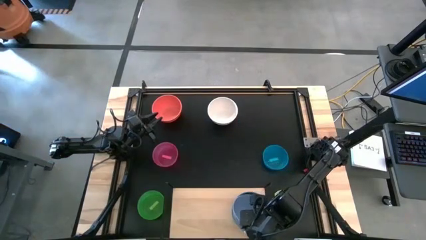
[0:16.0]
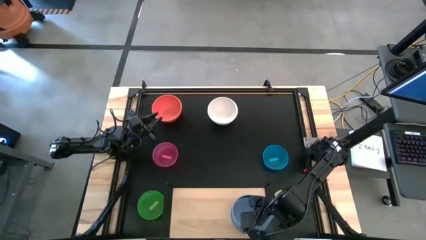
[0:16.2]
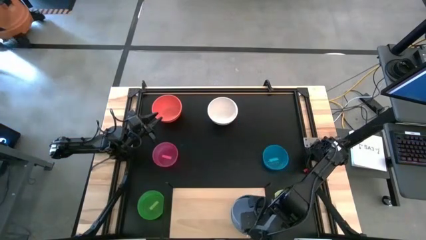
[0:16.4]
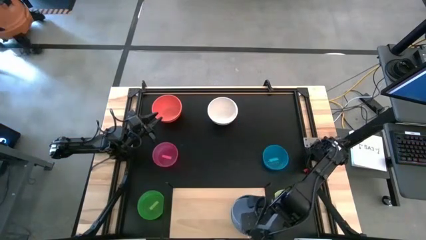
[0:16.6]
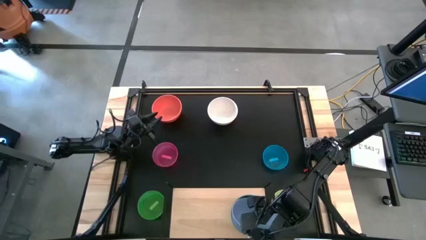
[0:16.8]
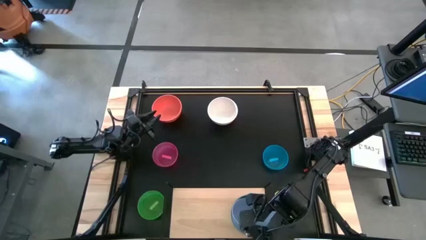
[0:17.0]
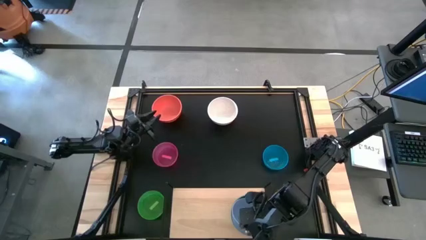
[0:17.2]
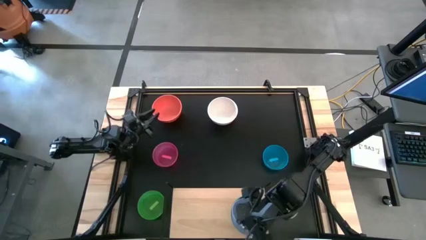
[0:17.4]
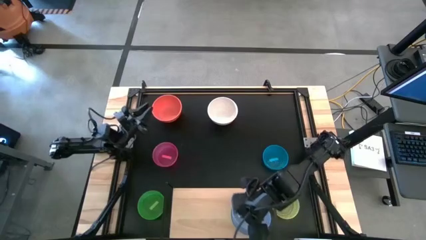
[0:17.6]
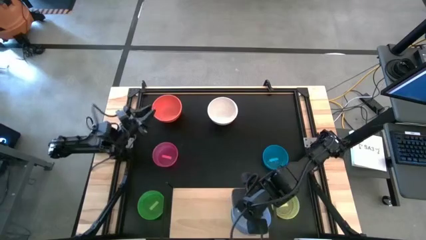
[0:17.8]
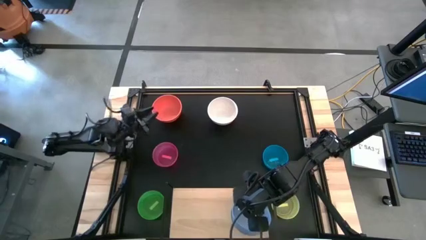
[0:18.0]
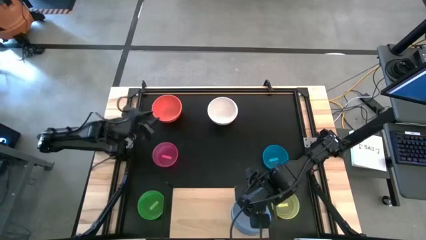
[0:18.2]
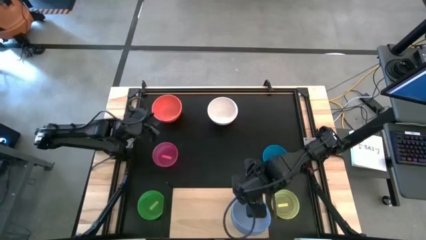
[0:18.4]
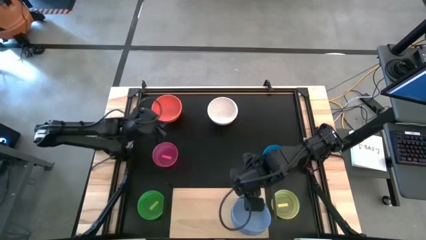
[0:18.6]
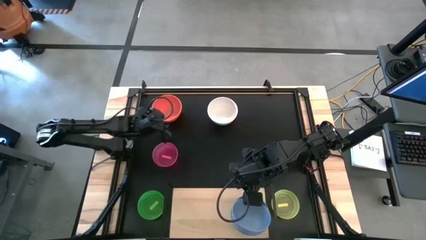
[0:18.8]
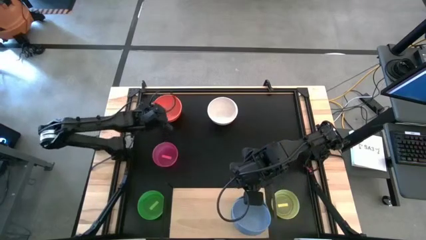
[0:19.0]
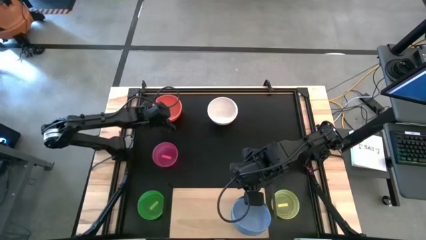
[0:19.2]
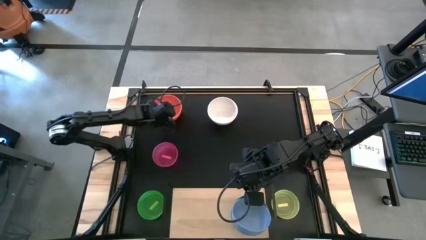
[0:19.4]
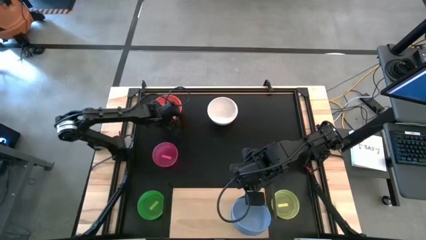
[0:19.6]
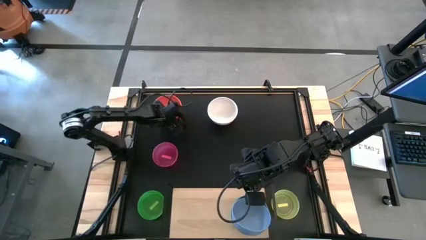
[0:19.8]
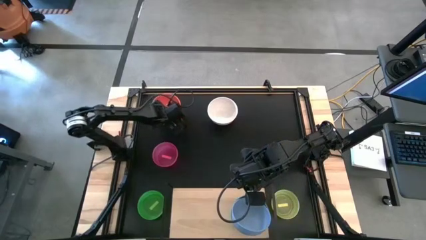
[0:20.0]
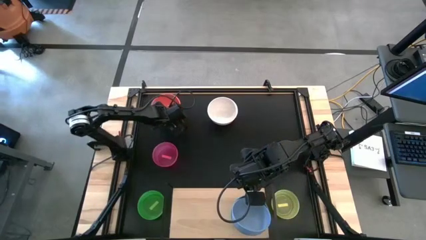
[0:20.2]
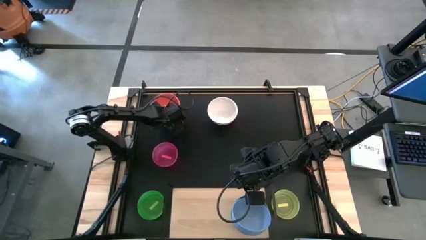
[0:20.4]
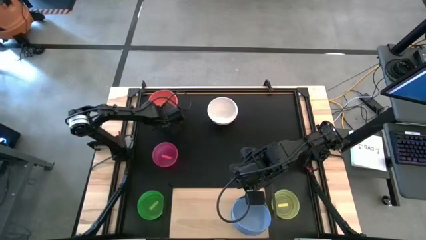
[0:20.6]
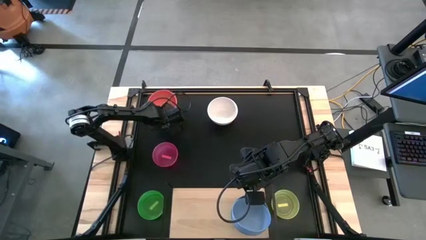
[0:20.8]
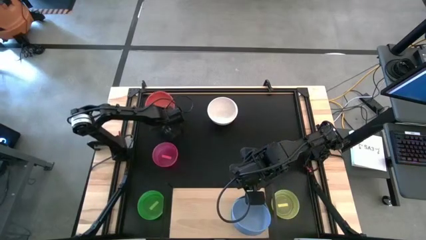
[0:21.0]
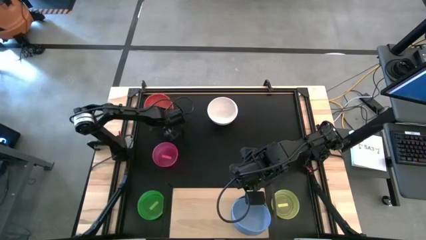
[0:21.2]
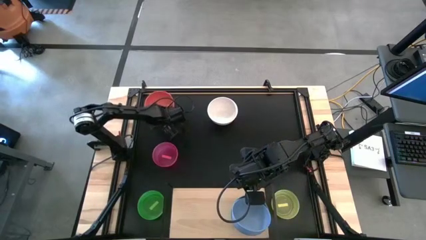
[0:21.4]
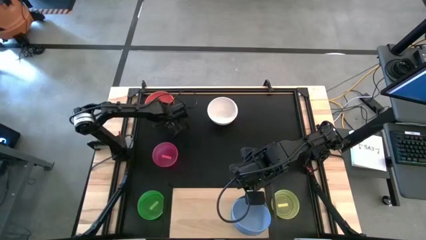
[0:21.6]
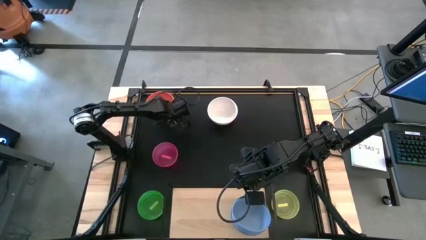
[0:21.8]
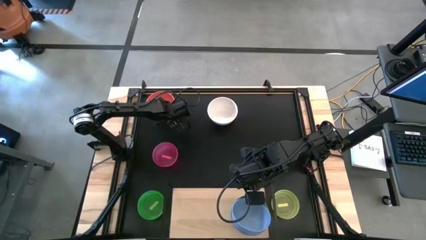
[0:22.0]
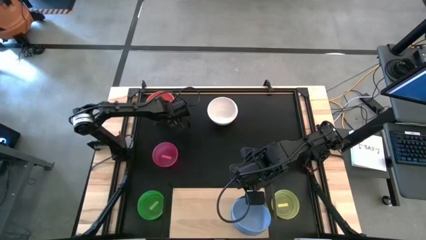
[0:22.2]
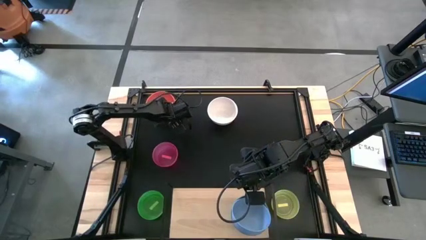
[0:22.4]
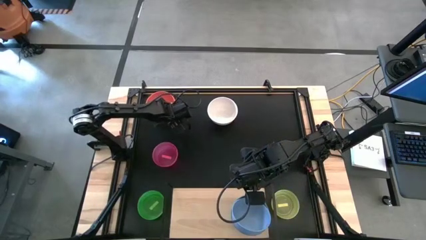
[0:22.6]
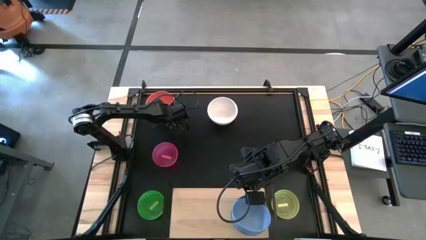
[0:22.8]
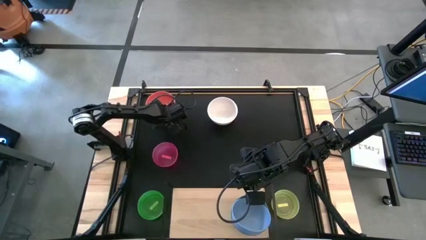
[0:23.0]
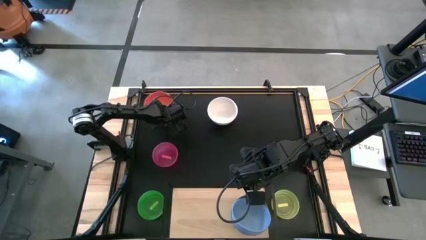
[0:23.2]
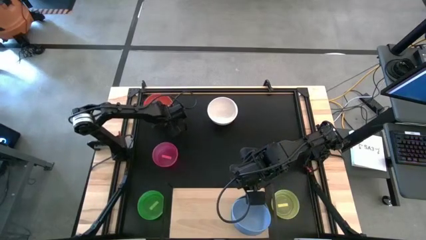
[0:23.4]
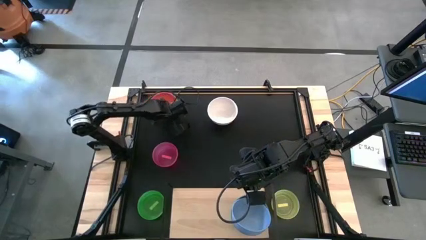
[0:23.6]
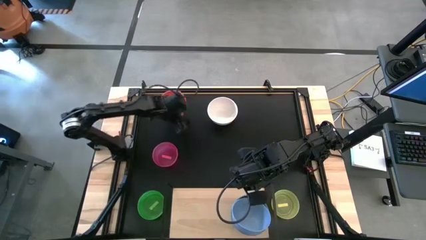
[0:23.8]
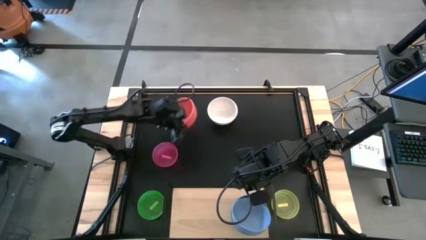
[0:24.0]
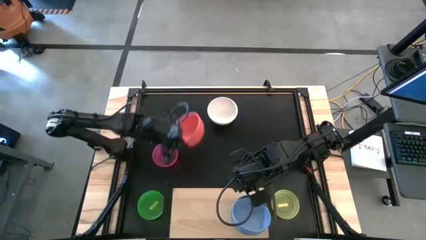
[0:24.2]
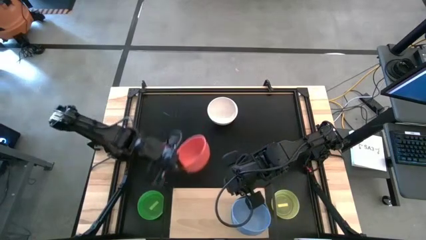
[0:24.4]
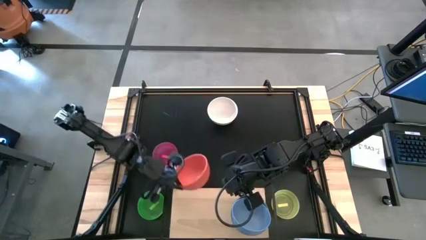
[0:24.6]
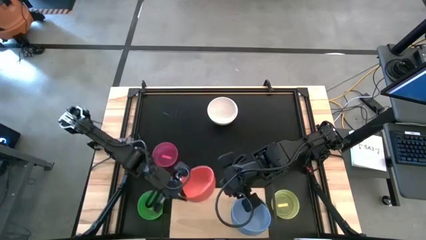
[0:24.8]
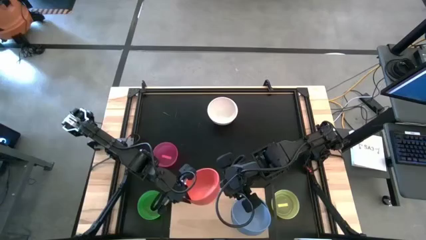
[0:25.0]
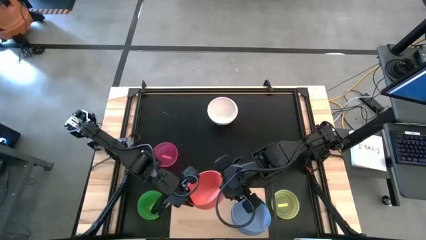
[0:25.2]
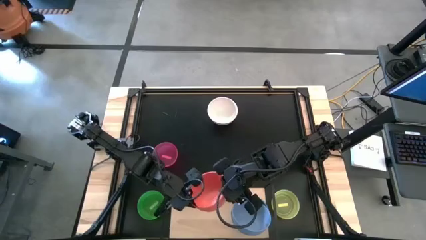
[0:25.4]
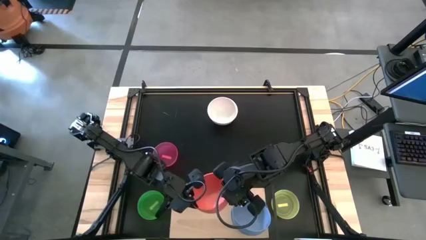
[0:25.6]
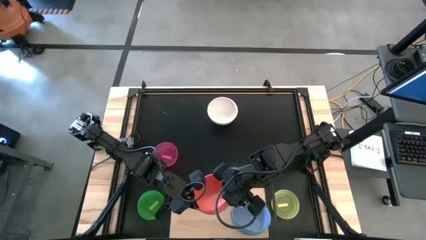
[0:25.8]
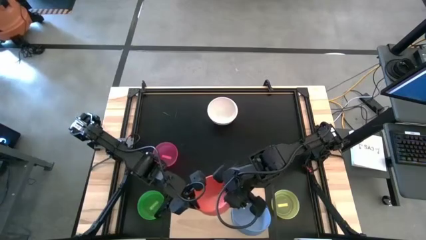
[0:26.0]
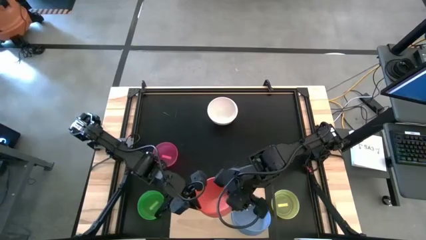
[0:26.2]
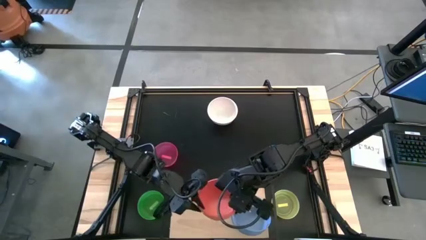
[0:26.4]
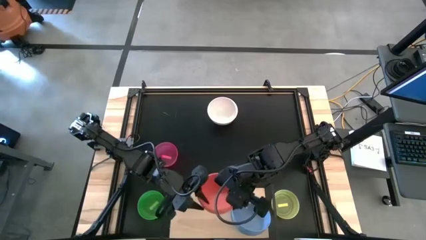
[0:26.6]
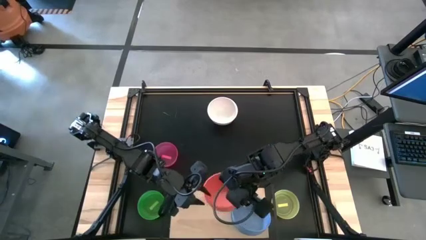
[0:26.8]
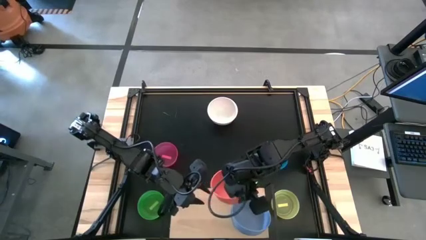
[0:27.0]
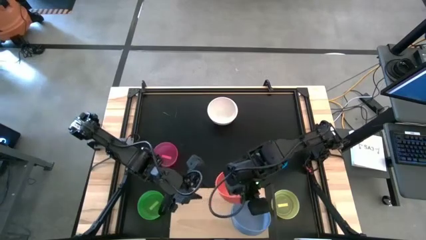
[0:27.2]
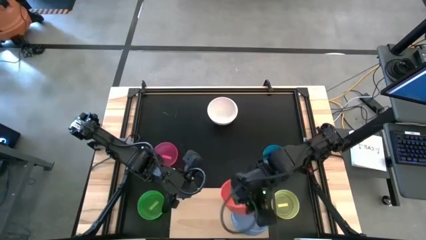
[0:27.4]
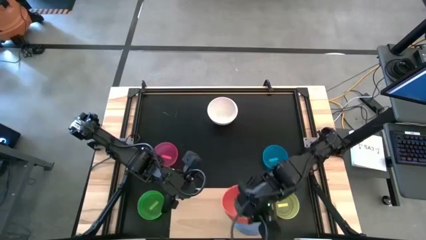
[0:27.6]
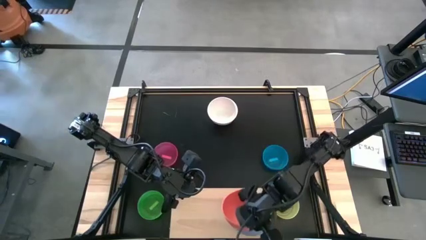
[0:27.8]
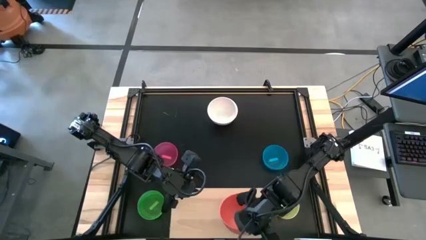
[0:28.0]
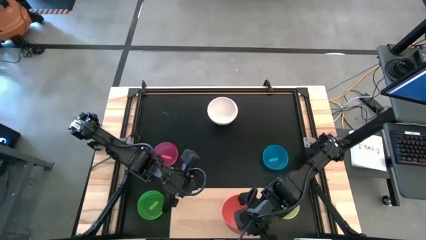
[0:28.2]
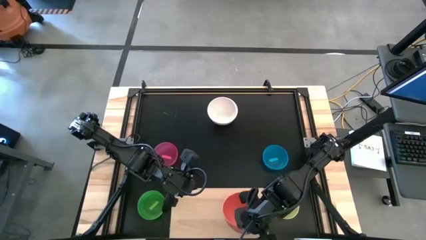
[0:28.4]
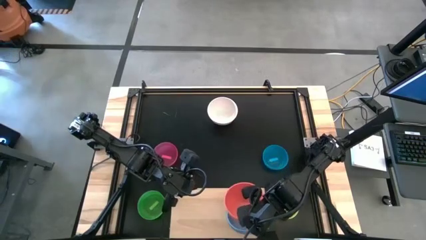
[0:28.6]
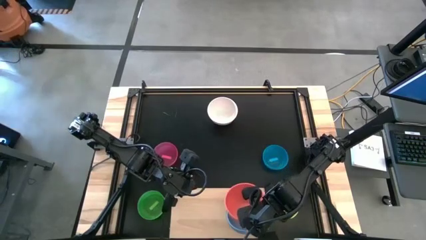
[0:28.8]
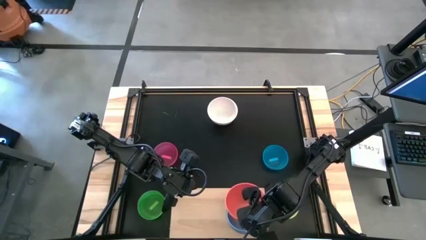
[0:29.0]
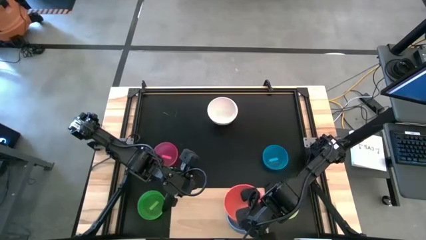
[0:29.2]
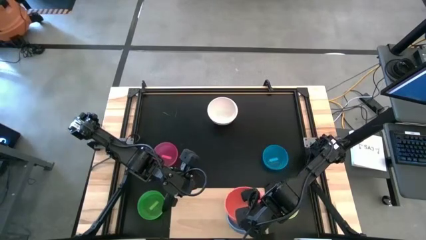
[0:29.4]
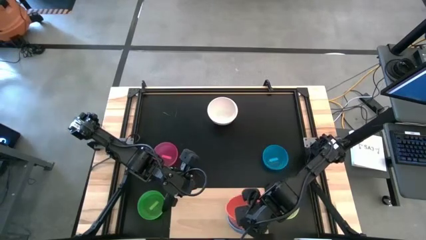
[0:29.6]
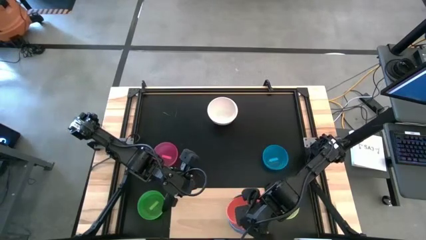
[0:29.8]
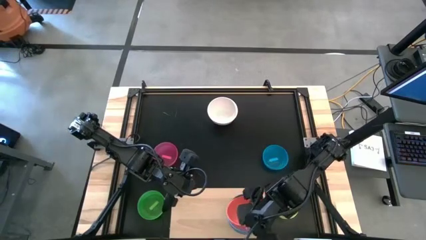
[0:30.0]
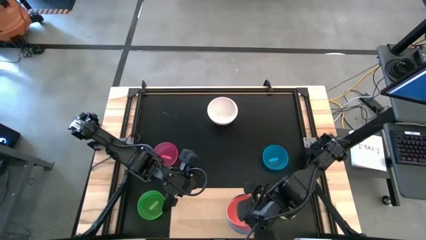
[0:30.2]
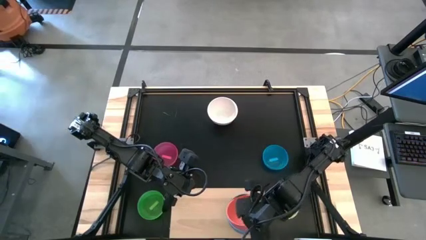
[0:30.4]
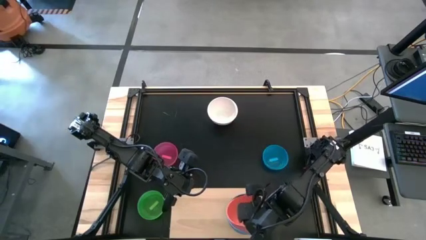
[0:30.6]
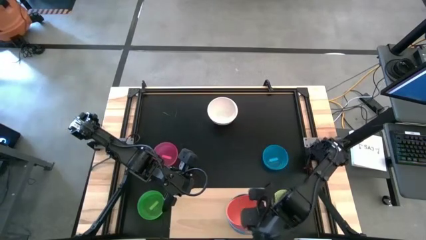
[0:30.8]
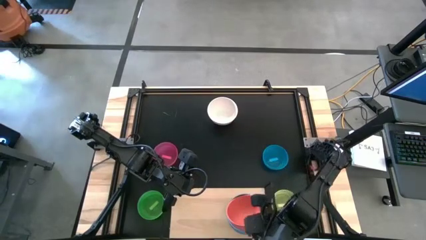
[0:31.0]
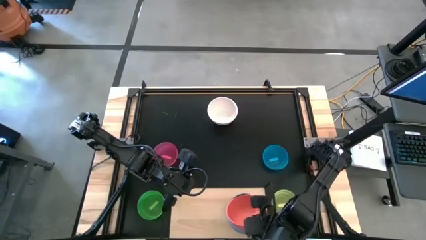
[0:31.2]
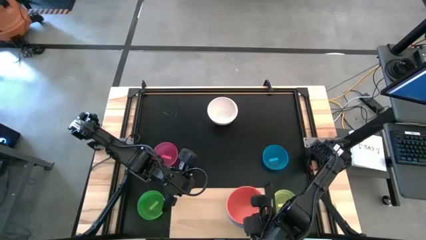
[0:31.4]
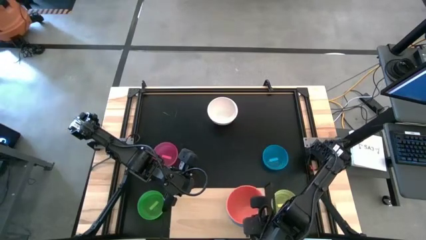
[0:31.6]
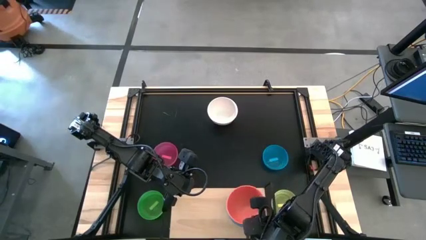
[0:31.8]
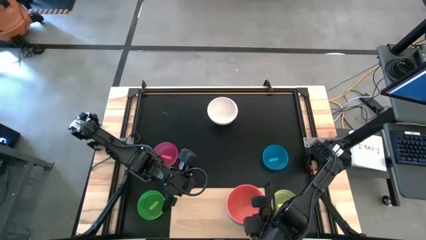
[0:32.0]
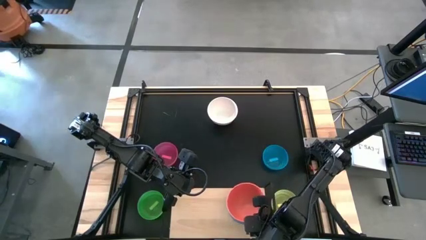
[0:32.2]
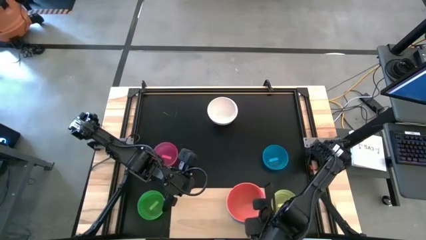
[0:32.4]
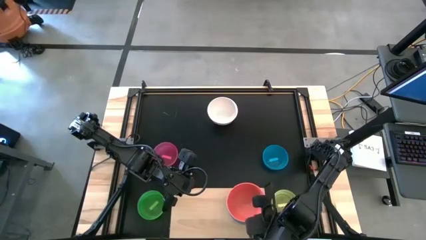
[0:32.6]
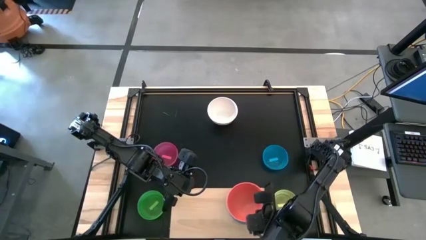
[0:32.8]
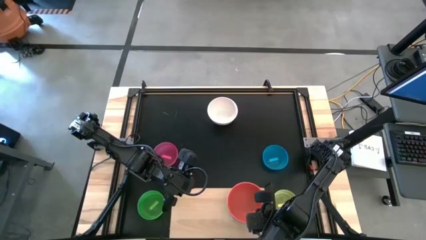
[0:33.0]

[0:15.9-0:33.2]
Task: Place and stack bowls onto a shelf
Stack the orange bowl on top of the blue bowl on the shelf
